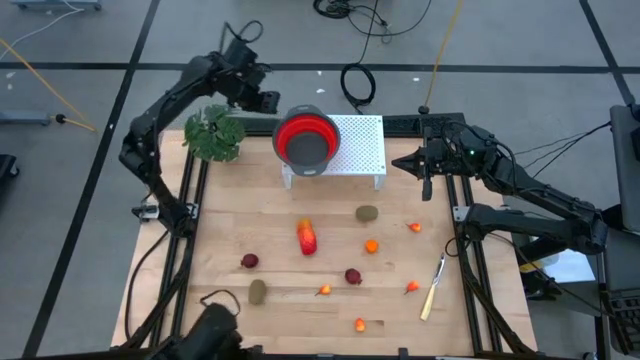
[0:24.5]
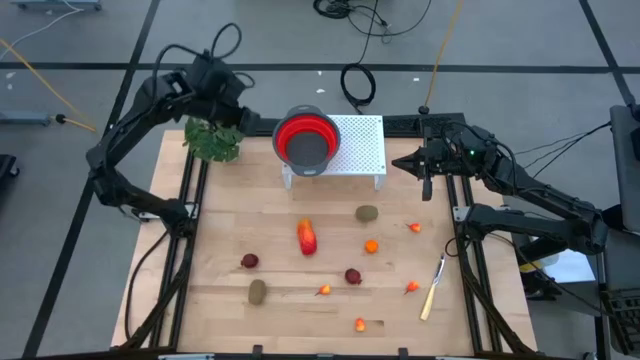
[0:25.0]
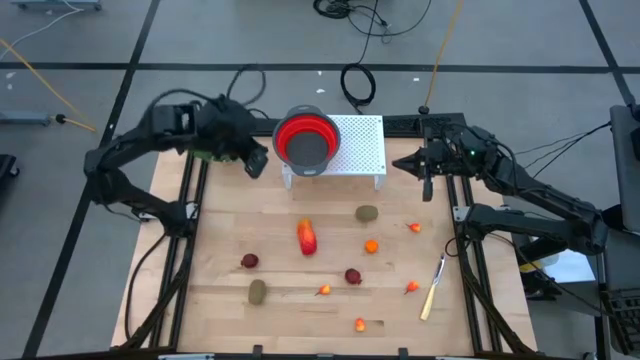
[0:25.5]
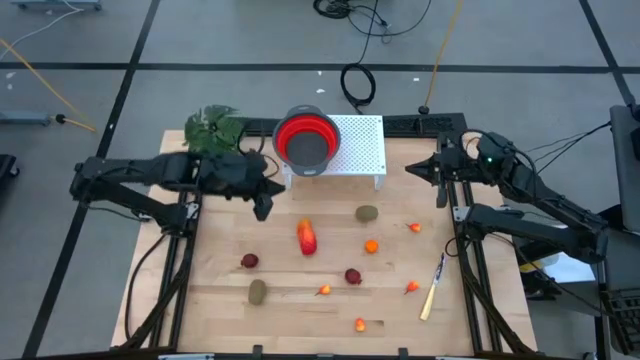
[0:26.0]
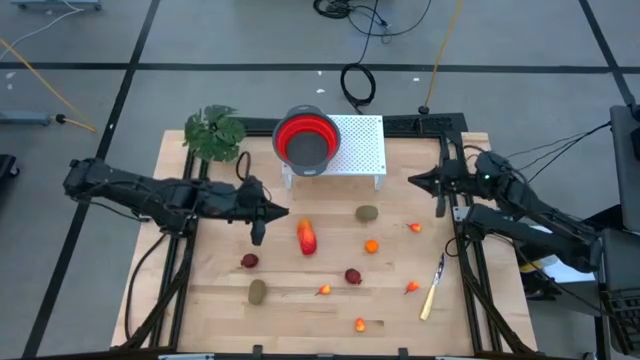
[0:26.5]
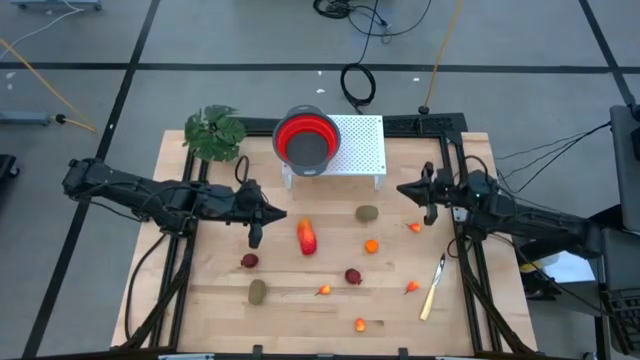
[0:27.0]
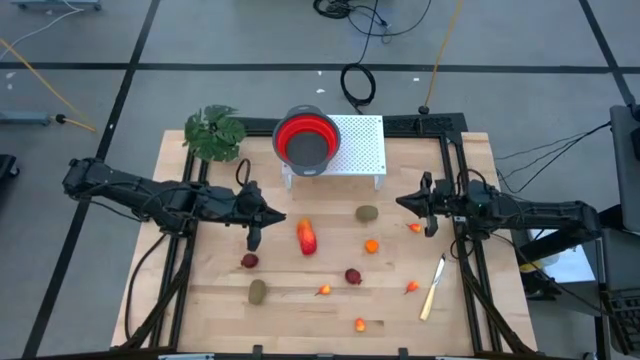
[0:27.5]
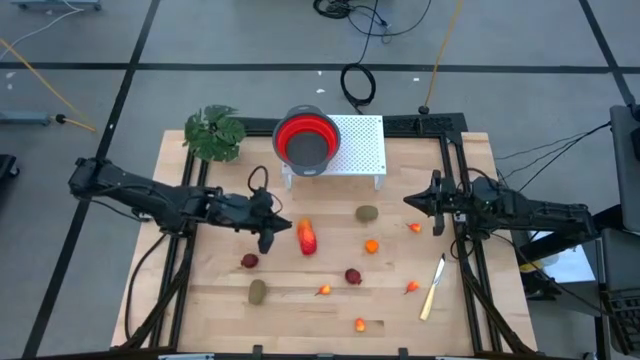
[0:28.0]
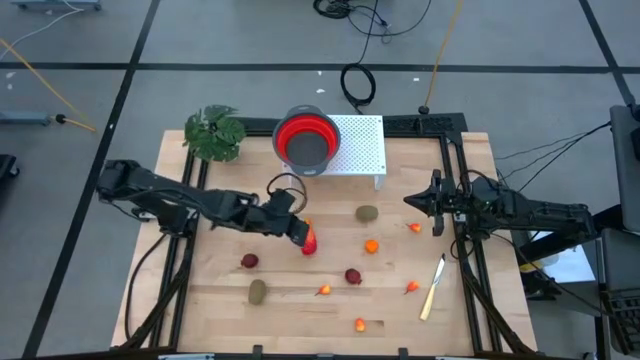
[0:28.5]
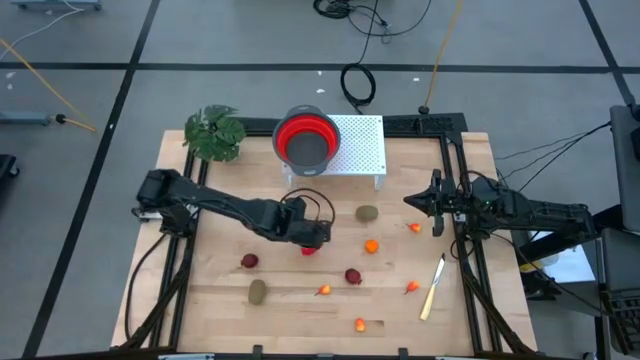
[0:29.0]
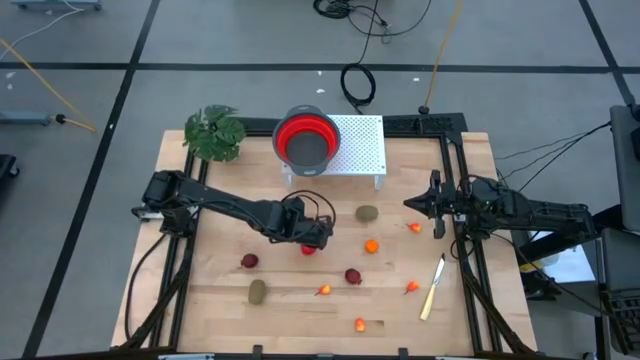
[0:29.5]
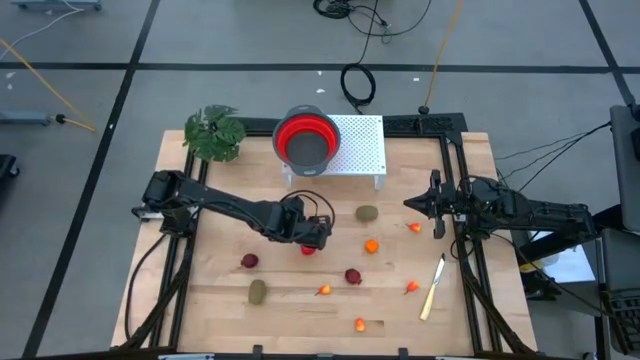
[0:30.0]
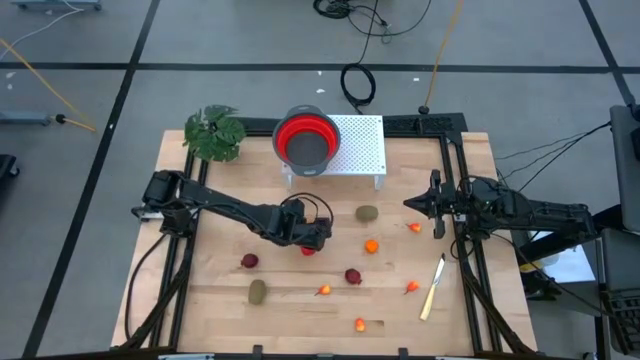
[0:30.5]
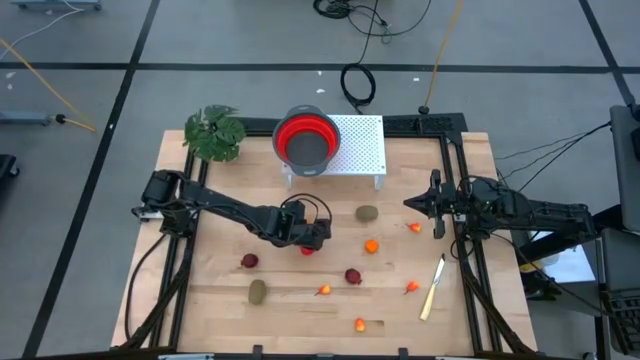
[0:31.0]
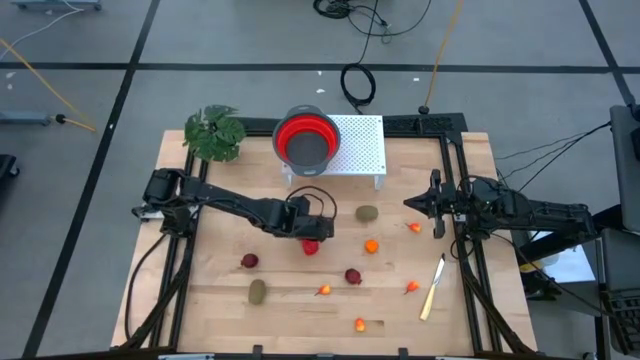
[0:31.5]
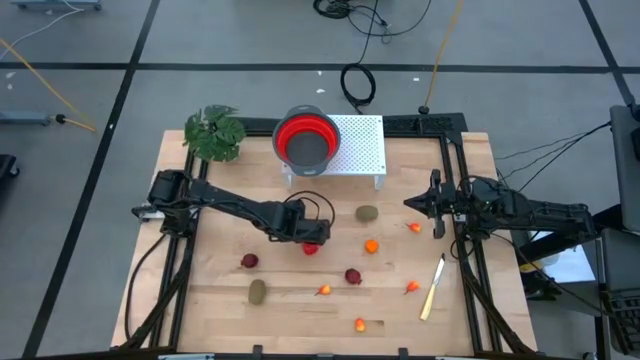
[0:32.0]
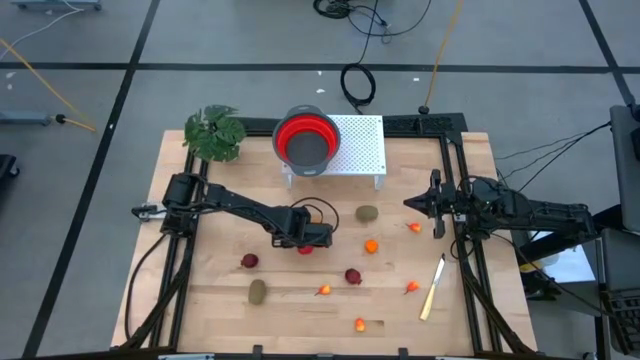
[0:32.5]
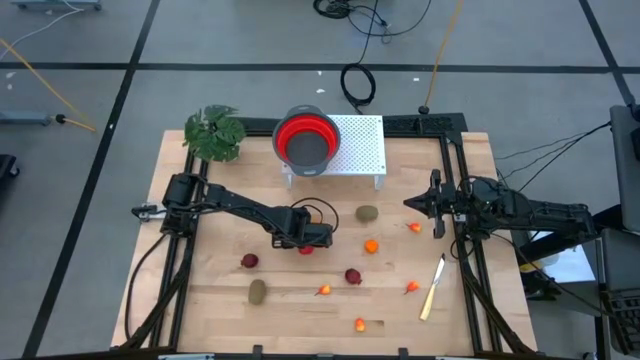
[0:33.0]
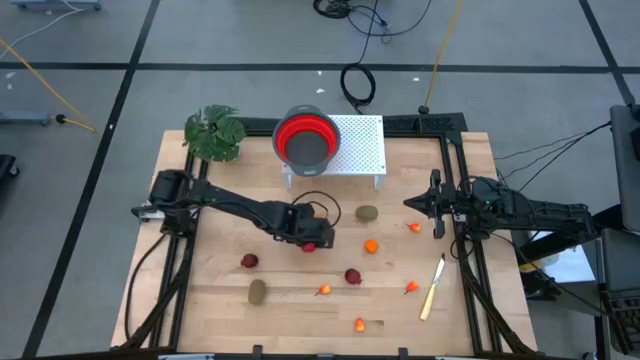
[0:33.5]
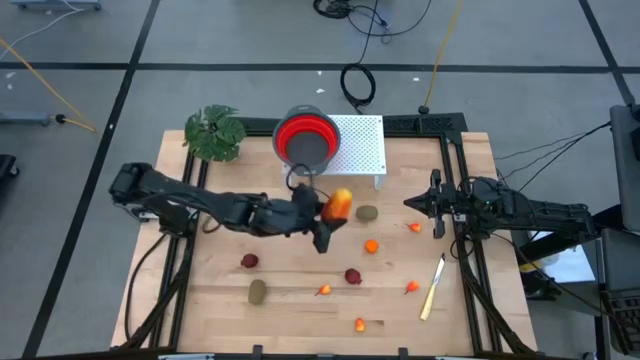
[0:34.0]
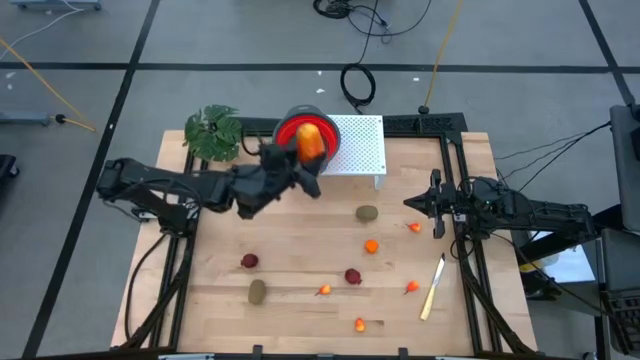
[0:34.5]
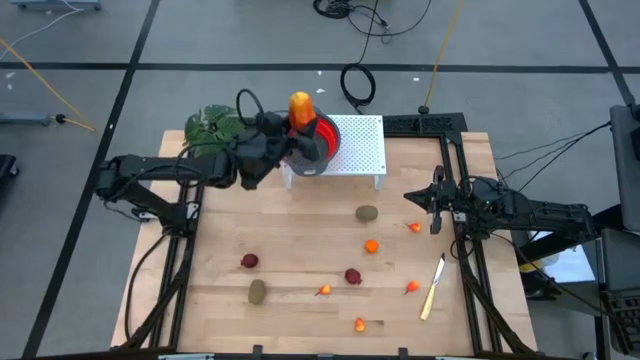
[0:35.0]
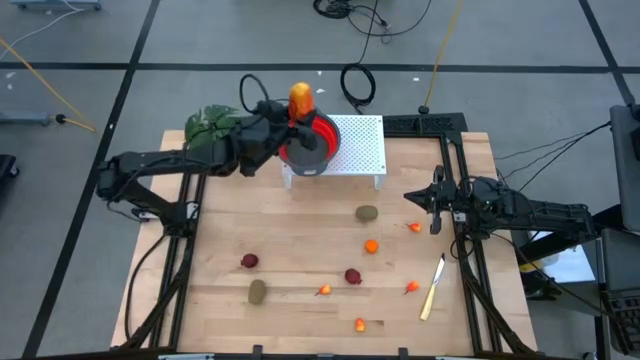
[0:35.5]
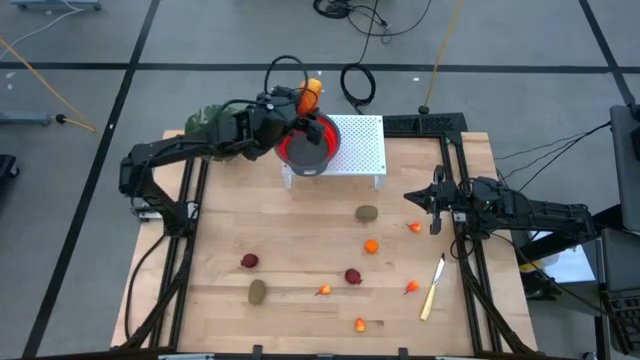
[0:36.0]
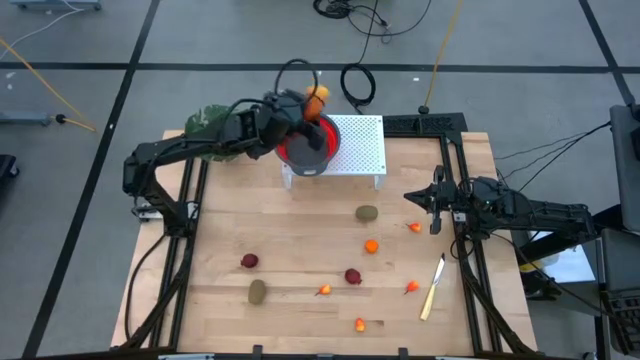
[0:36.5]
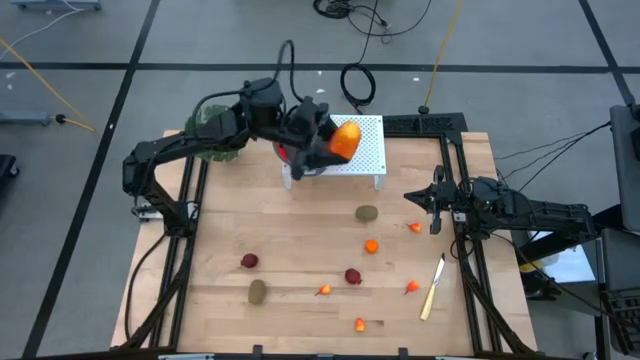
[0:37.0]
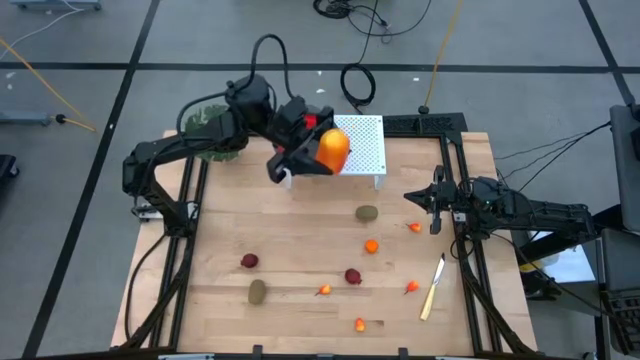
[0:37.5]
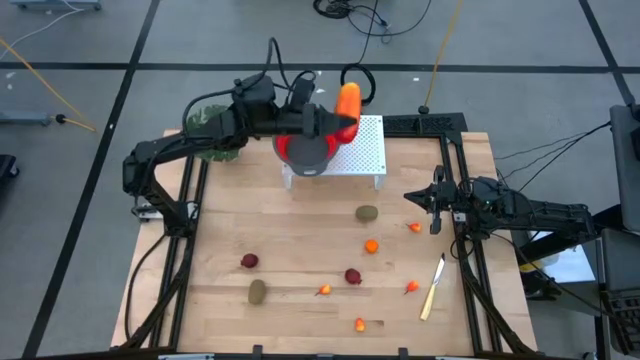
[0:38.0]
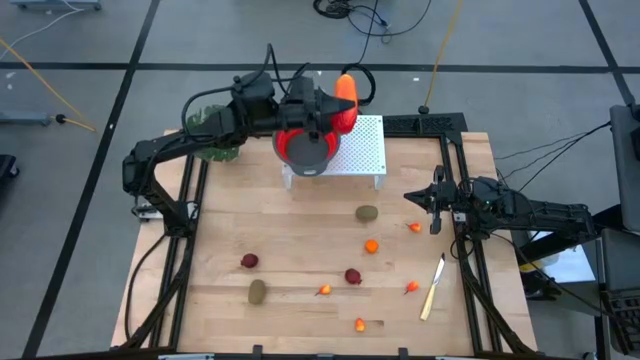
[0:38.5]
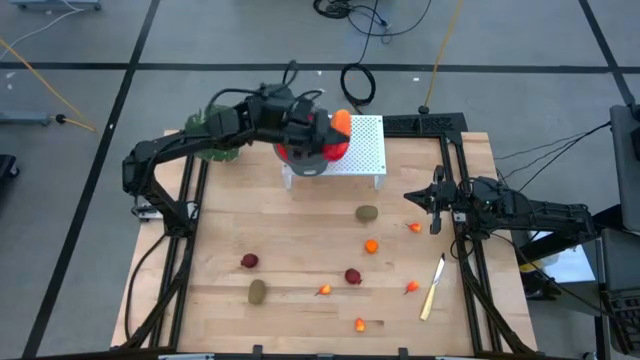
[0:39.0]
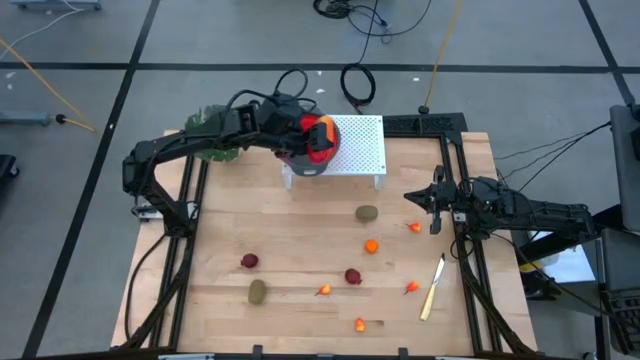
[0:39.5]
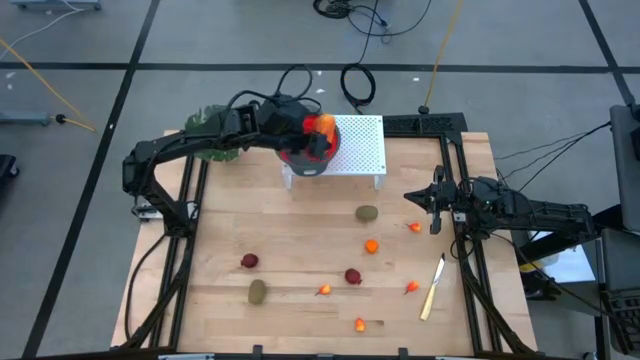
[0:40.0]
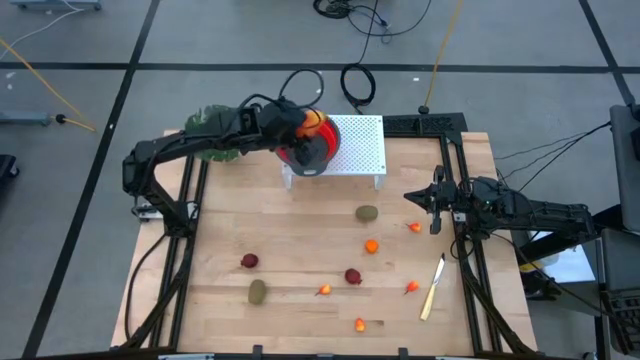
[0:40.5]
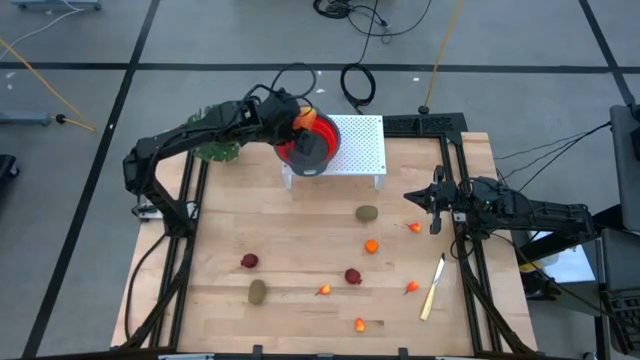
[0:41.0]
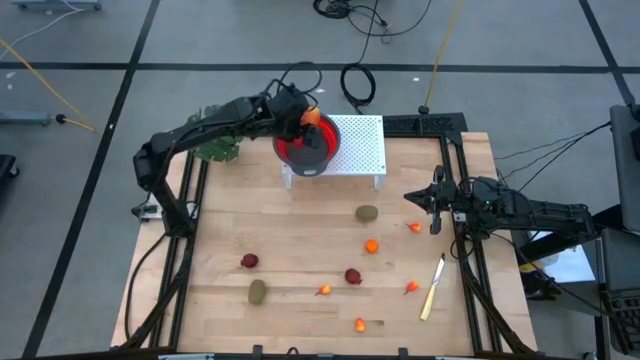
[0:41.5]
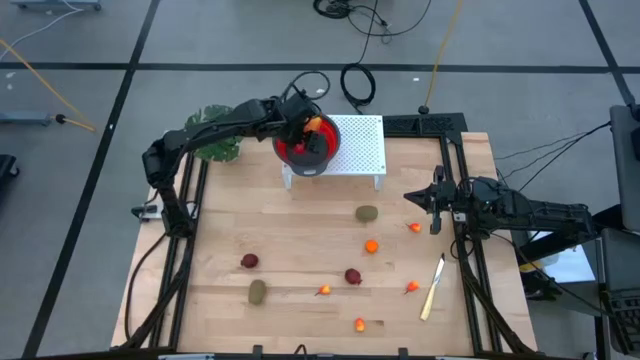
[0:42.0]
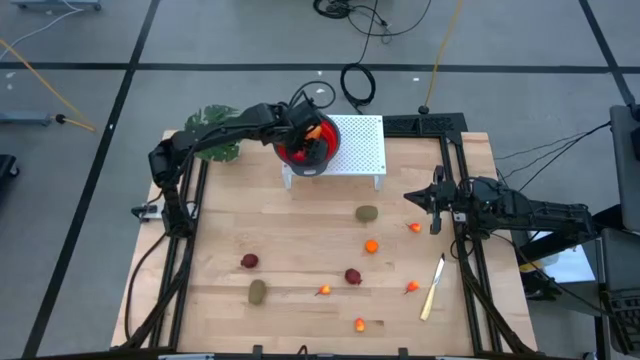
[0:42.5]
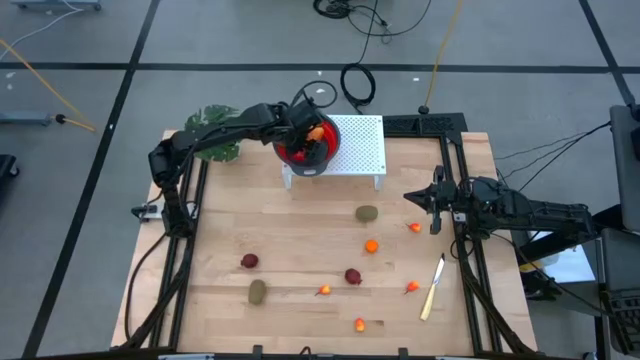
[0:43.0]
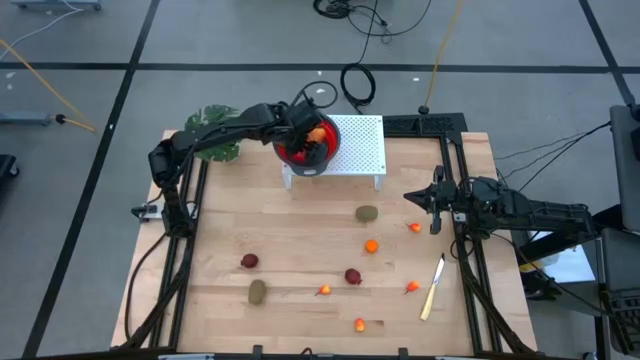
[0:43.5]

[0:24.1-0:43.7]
Task: Pick & Place Fruit
Put the mango into the red strainer bowl
